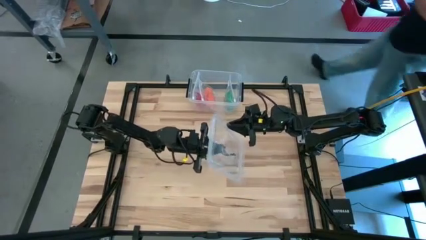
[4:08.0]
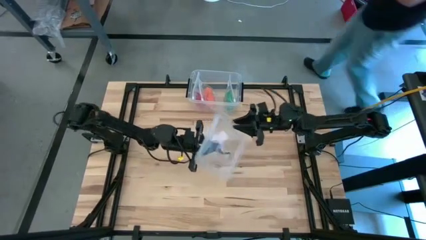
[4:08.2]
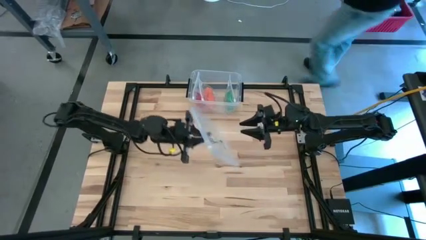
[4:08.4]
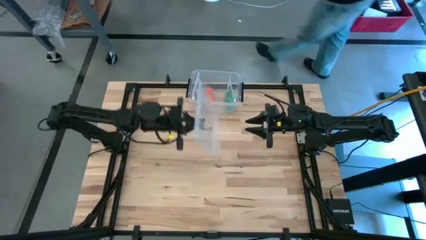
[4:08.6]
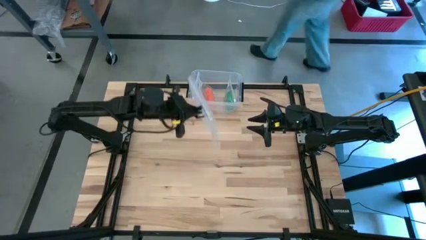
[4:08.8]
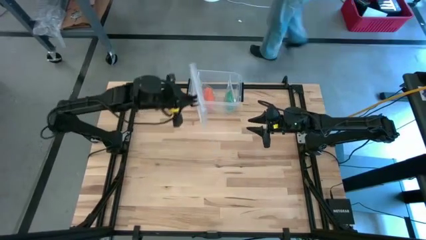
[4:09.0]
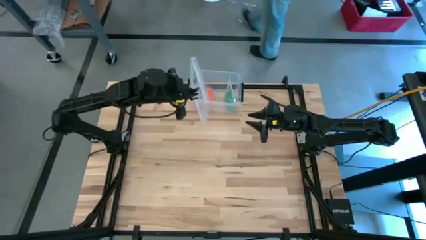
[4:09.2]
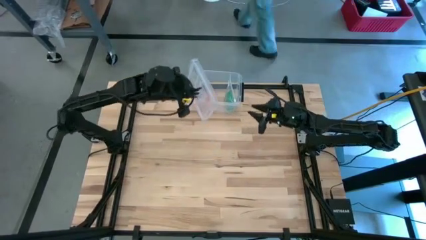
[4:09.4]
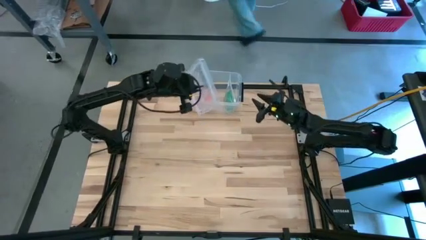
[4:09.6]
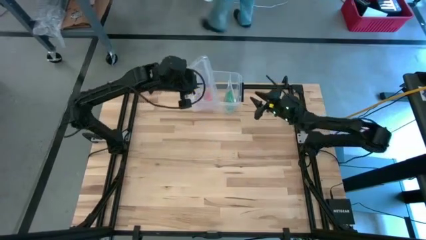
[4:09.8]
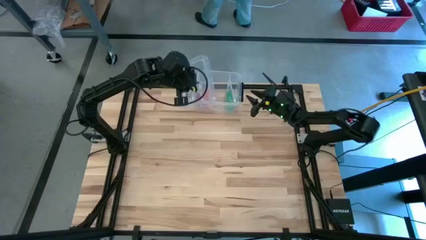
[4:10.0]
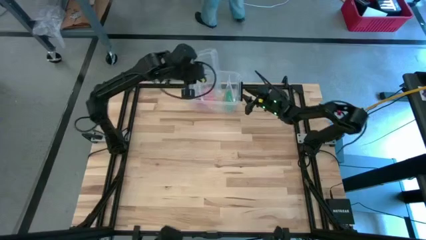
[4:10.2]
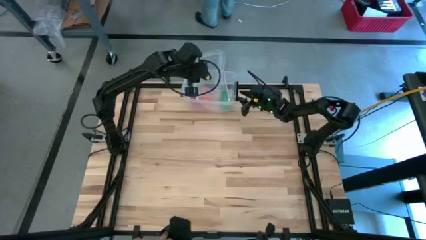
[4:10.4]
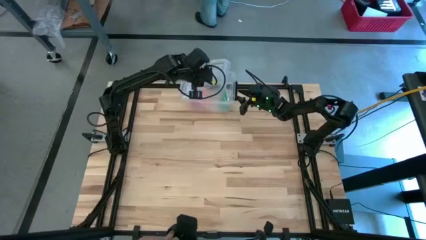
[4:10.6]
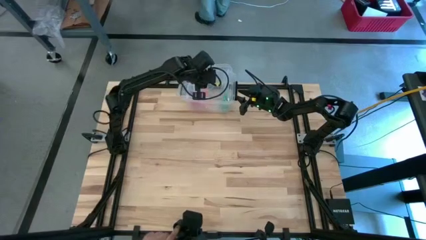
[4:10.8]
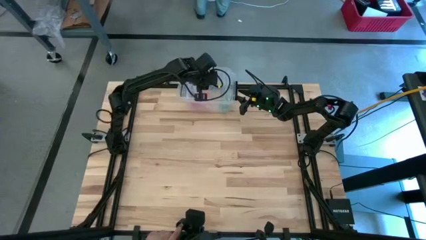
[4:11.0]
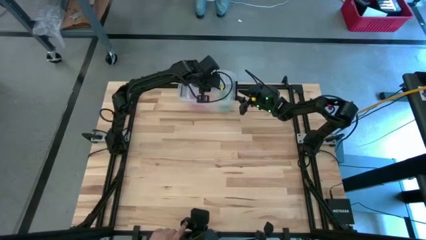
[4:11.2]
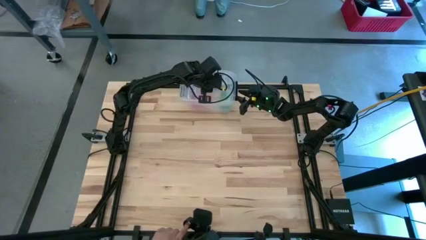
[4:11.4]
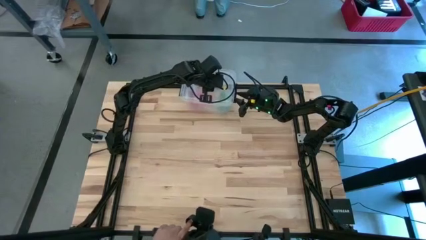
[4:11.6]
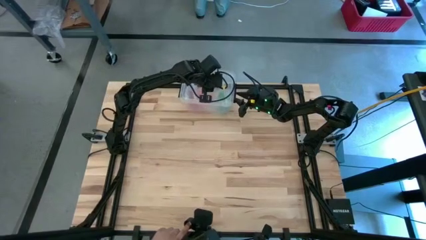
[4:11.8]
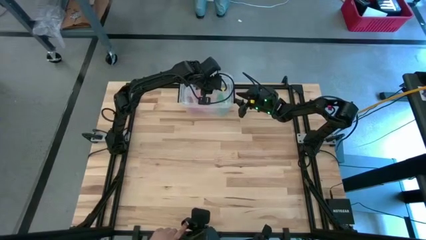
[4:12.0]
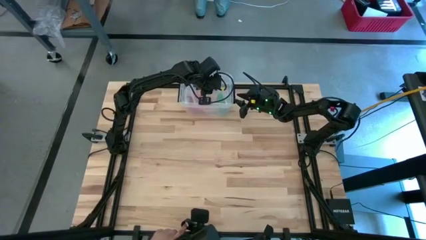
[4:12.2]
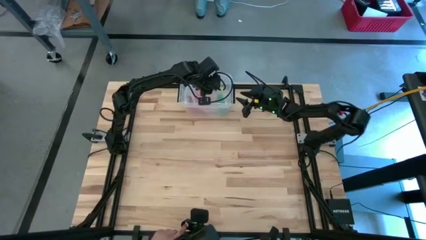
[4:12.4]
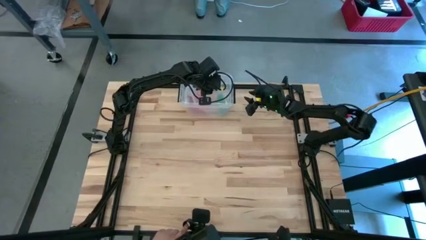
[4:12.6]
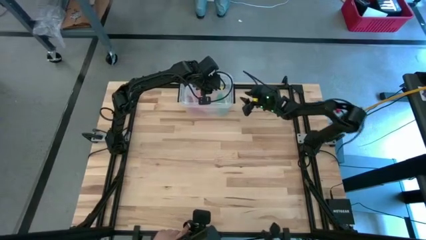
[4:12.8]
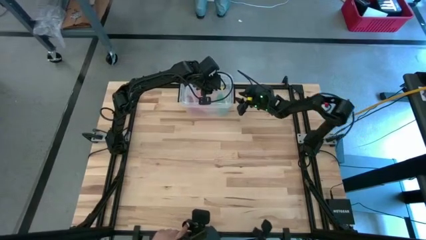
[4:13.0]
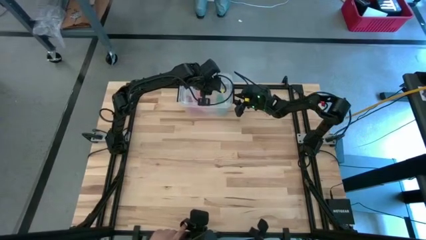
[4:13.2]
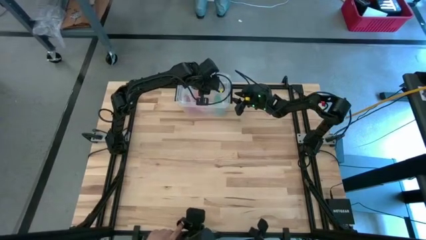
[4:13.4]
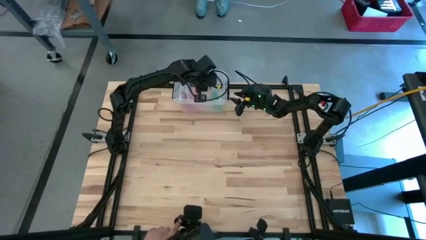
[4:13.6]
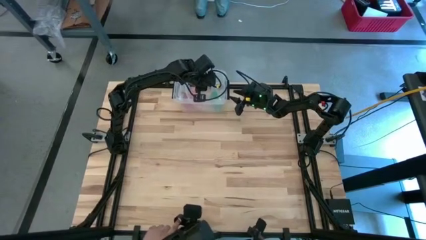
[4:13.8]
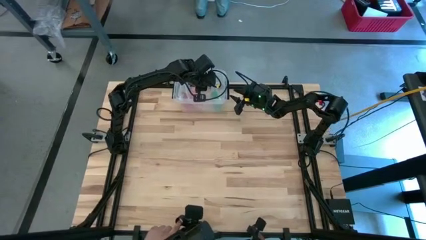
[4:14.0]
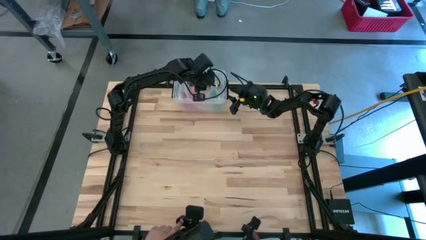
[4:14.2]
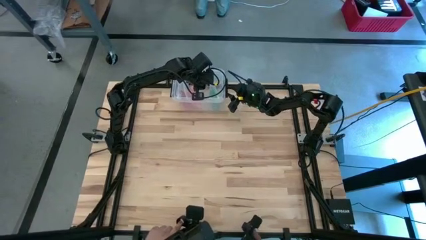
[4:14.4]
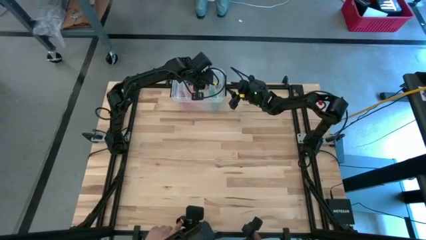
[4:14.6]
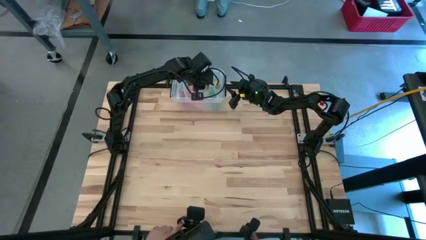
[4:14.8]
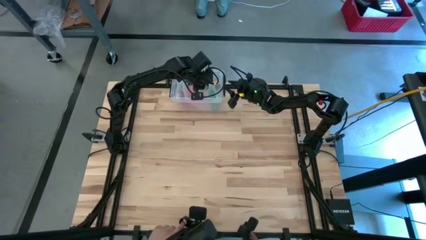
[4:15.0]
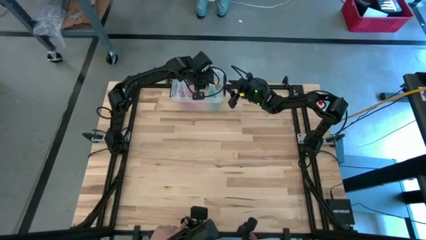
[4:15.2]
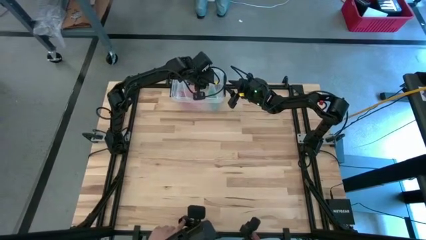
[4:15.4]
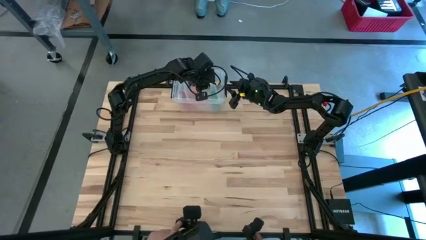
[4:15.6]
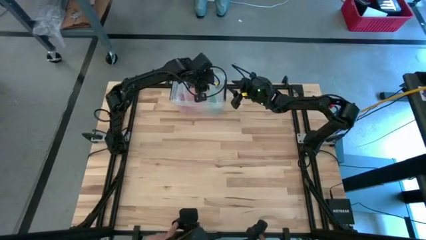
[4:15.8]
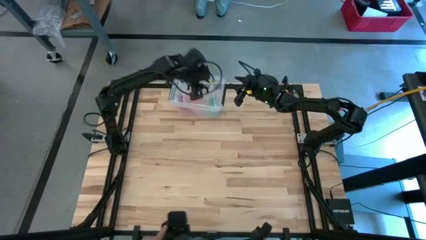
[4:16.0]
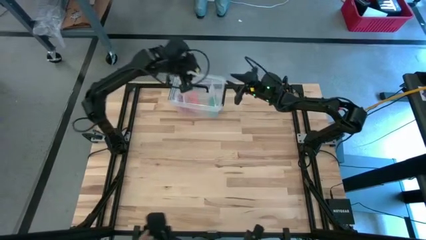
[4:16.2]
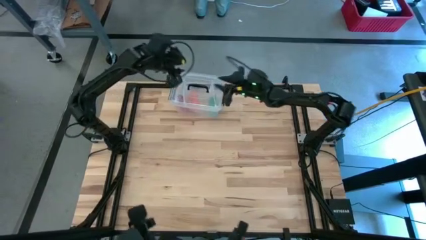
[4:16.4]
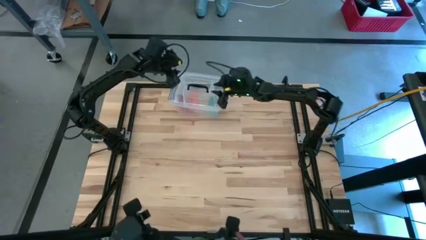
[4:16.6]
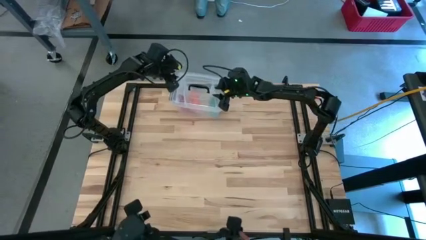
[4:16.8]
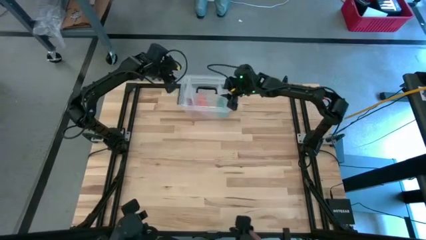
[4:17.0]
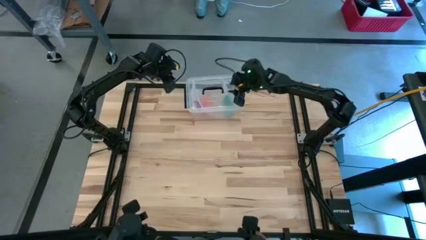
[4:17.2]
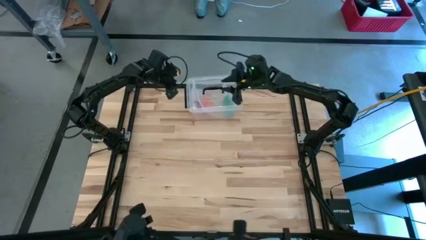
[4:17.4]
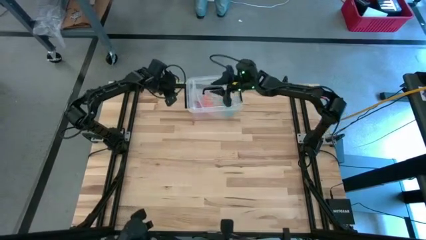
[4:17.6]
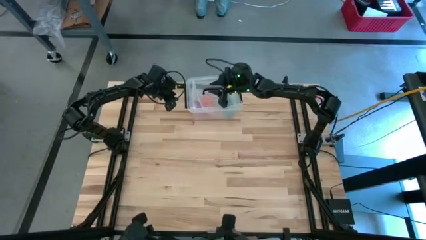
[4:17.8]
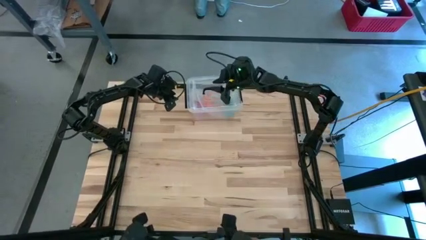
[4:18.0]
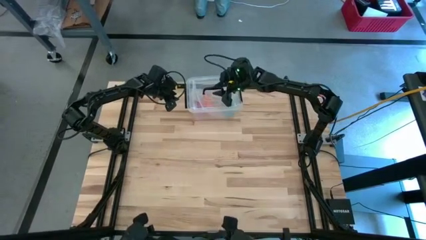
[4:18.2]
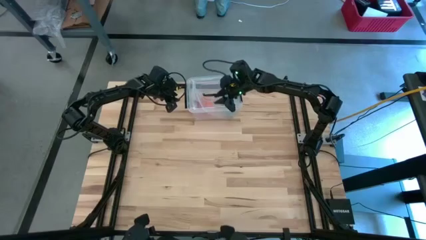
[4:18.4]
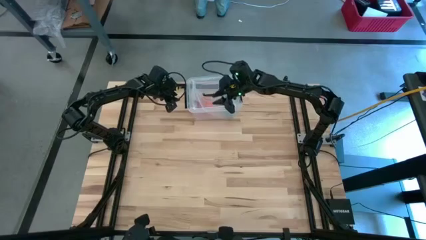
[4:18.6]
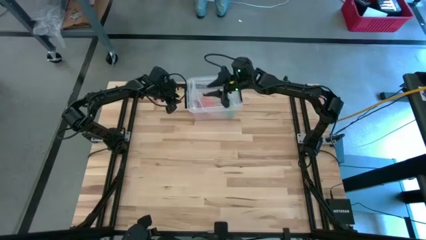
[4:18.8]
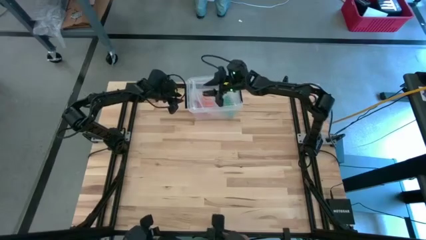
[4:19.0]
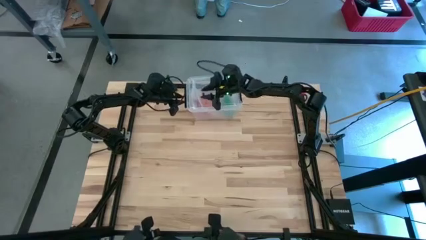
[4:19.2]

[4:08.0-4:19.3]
Task: Roll bandage
Close the transparent bin

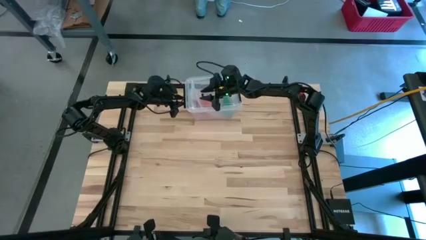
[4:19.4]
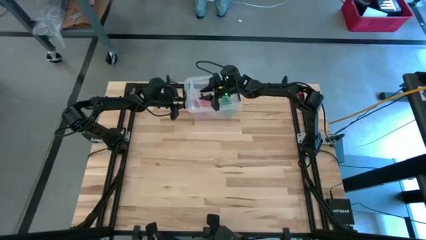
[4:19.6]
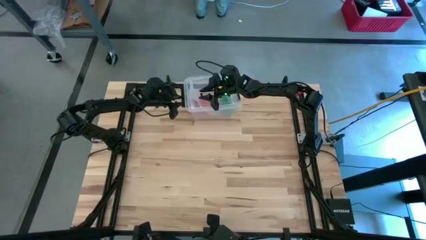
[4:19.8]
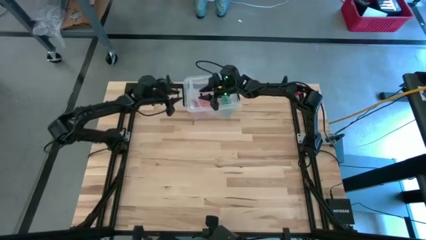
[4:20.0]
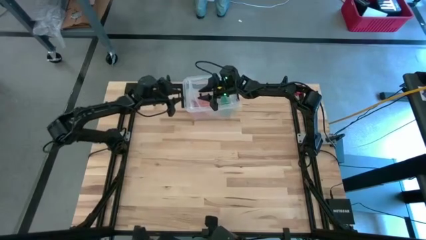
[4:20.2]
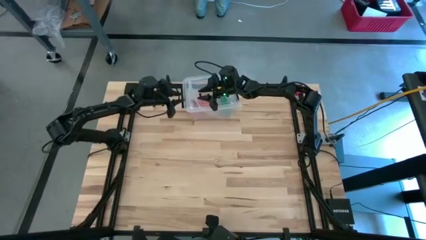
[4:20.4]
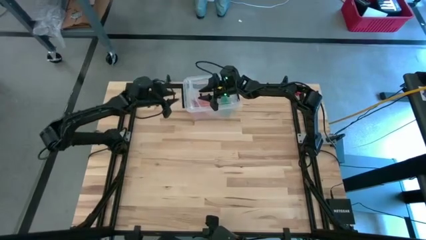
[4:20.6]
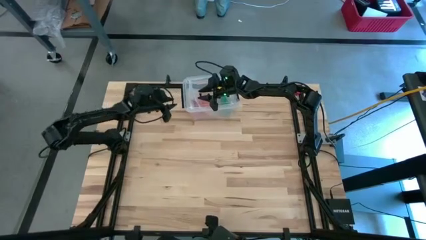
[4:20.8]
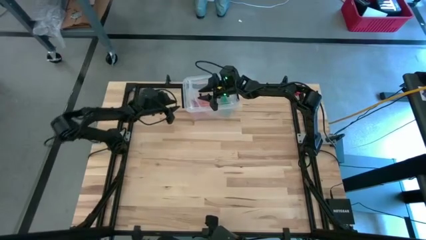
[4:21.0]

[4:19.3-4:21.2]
Close the transparent bin

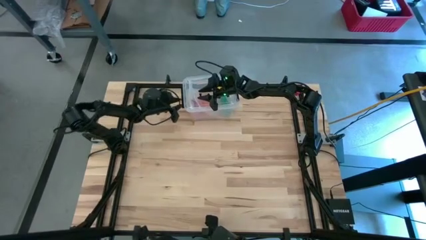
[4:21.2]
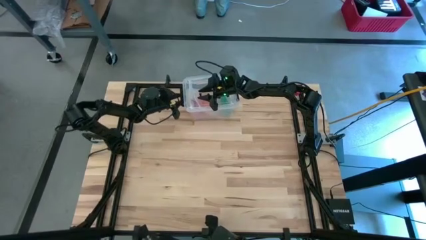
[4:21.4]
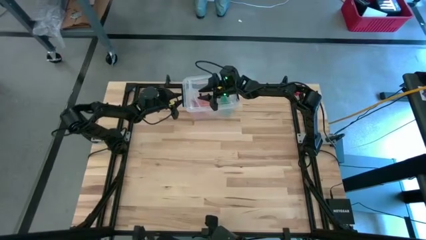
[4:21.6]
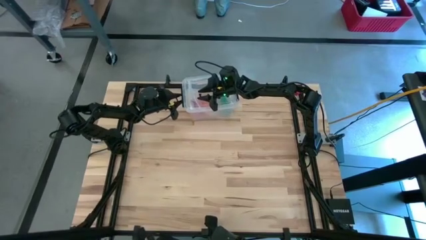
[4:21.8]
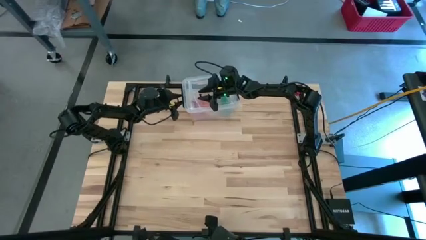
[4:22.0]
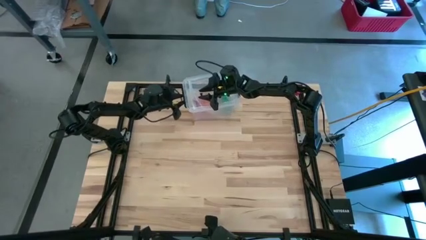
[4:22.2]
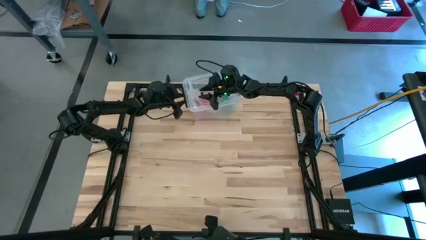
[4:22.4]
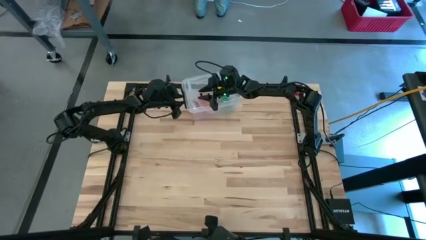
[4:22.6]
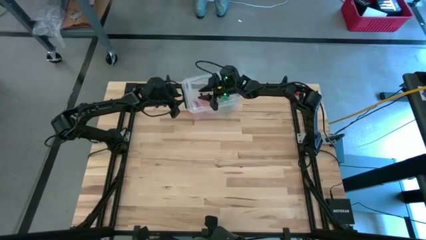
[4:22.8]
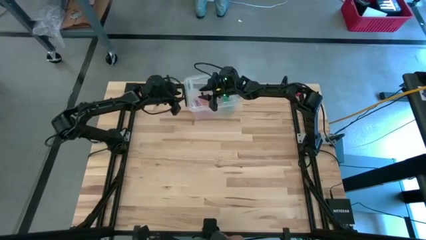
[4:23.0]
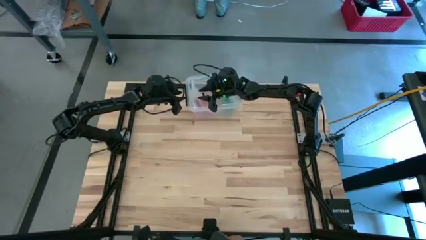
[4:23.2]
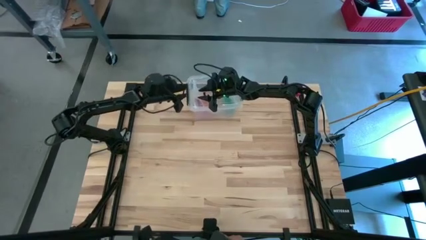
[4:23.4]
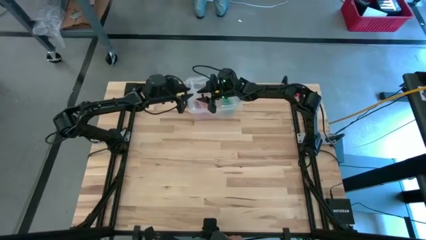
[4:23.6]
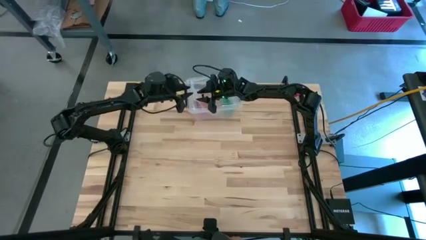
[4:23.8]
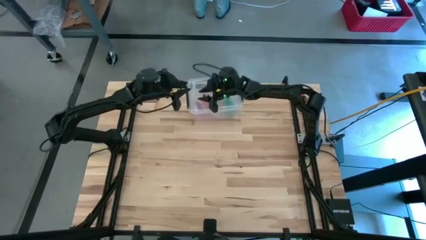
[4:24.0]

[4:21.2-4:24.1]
Close the transparent bin

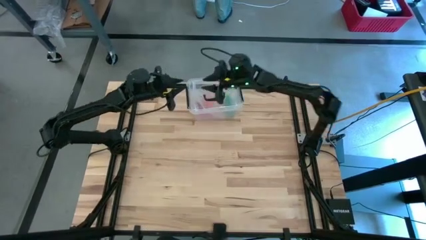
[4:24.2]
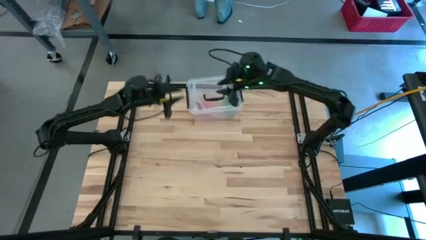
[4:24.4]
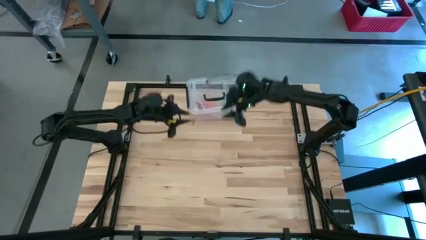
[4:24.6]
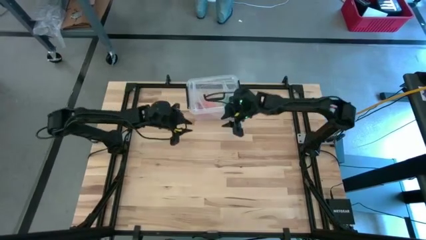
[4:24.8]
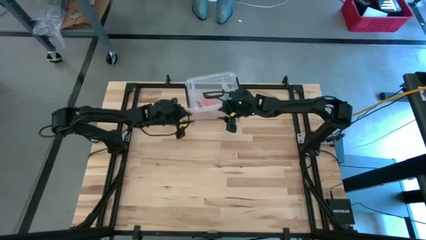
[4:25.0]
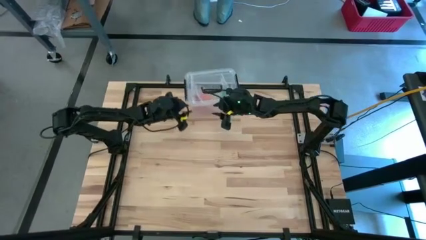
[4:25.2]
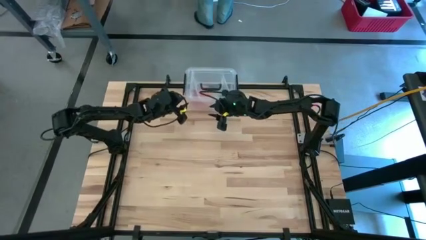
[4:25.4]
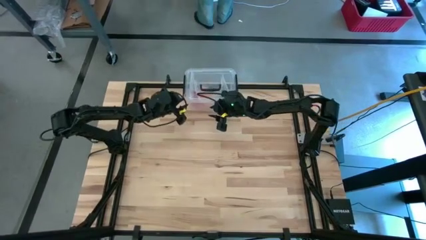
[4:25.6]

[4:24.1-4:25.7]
Adjust the transparent bin
